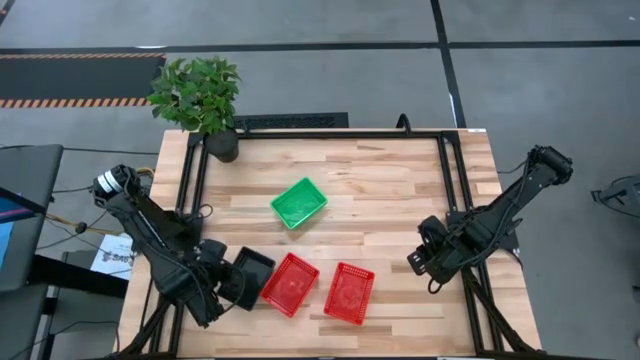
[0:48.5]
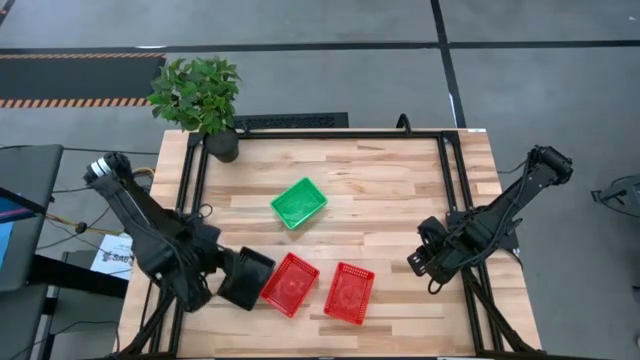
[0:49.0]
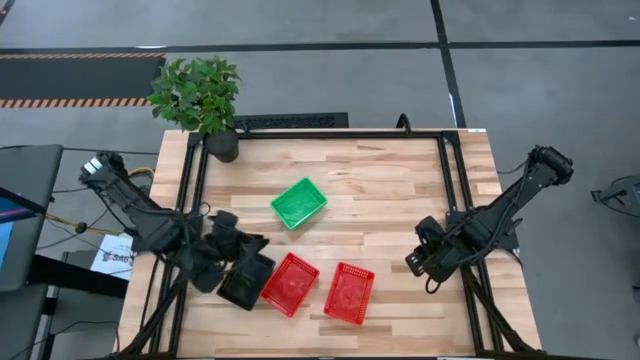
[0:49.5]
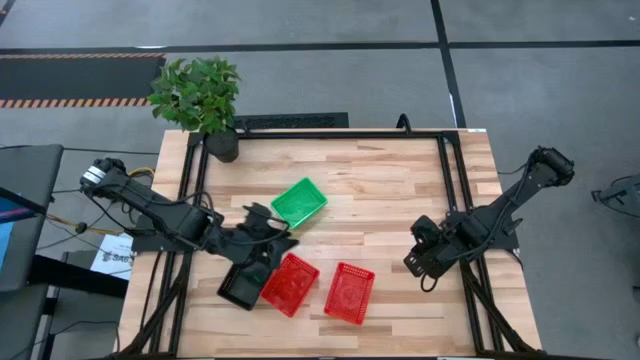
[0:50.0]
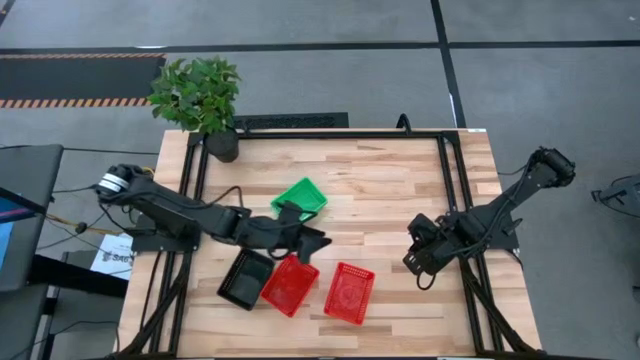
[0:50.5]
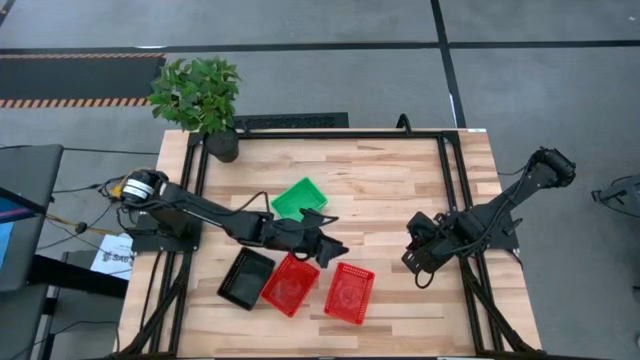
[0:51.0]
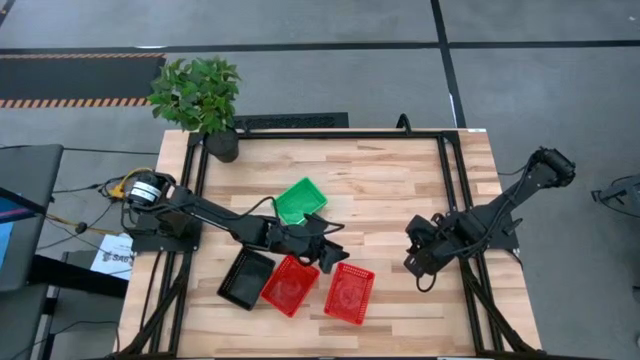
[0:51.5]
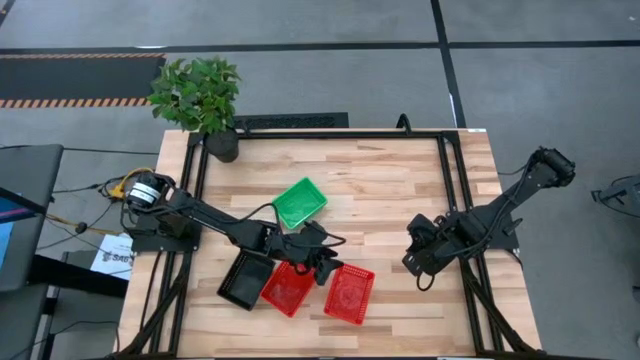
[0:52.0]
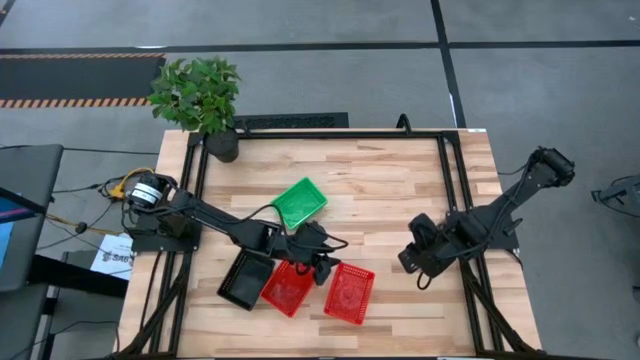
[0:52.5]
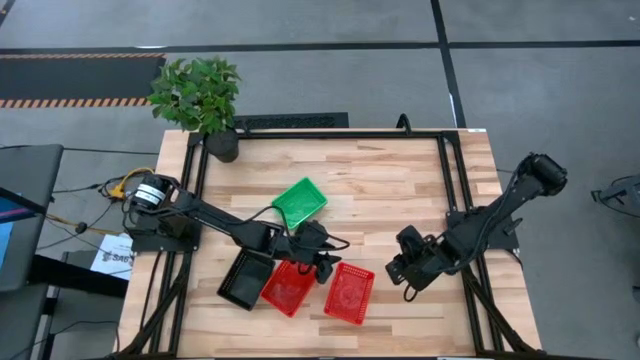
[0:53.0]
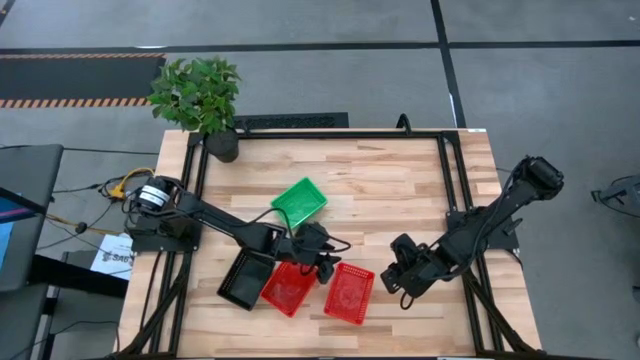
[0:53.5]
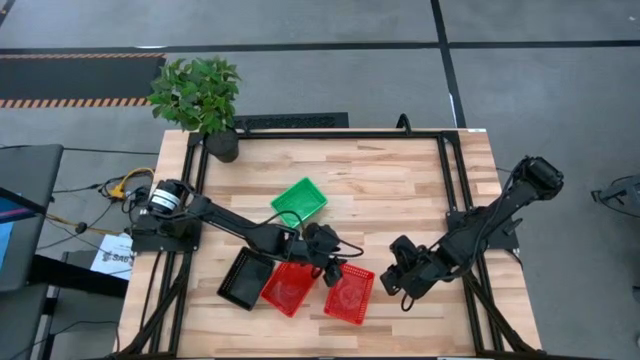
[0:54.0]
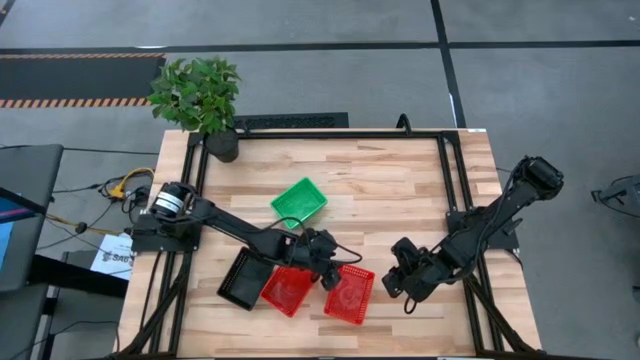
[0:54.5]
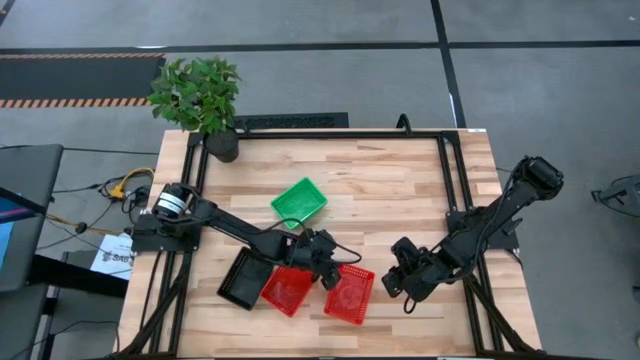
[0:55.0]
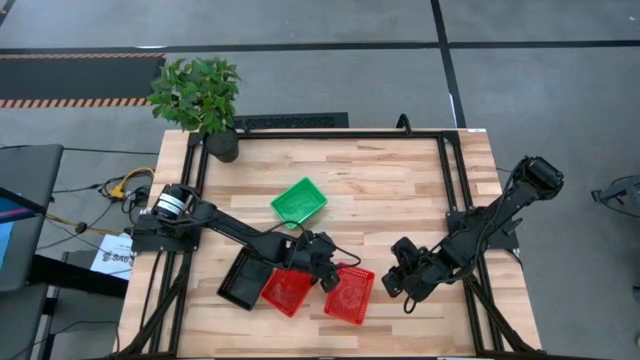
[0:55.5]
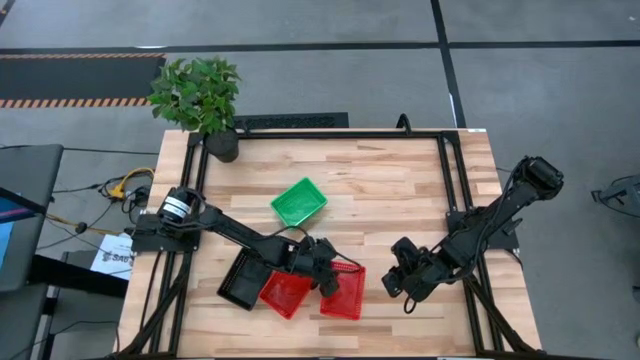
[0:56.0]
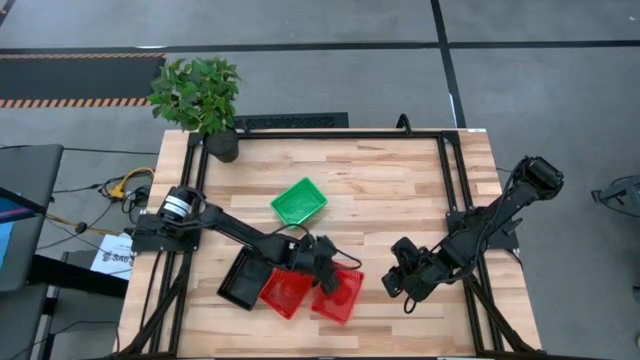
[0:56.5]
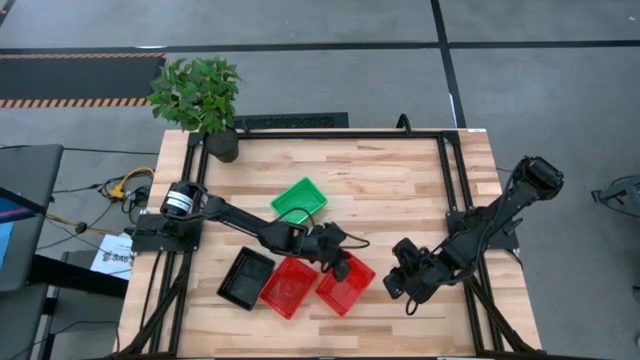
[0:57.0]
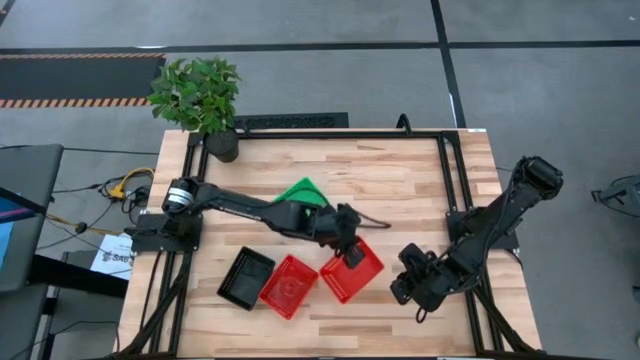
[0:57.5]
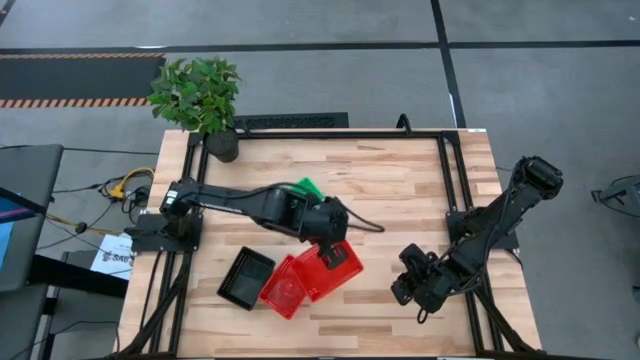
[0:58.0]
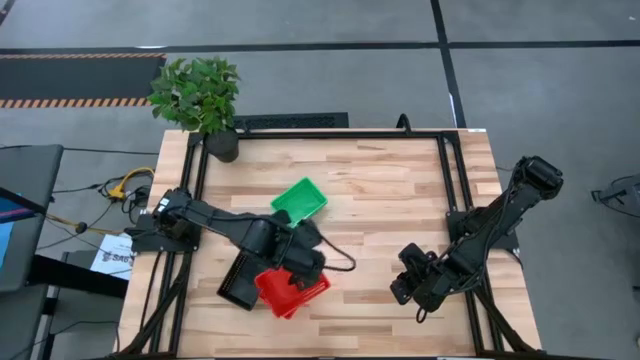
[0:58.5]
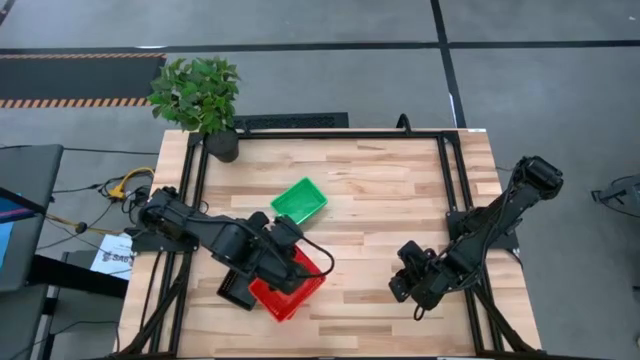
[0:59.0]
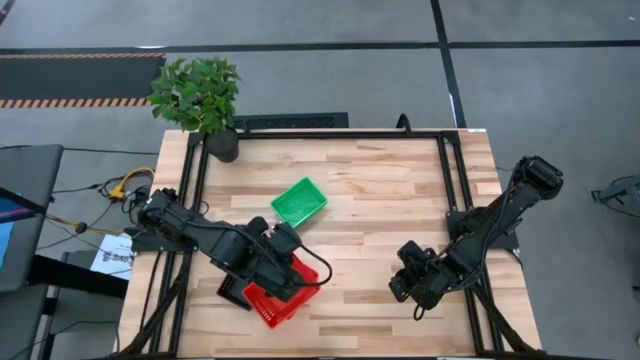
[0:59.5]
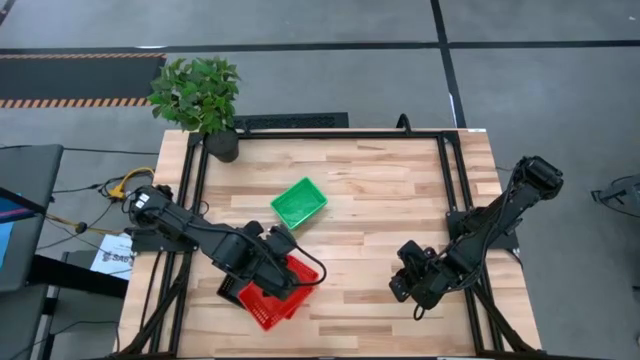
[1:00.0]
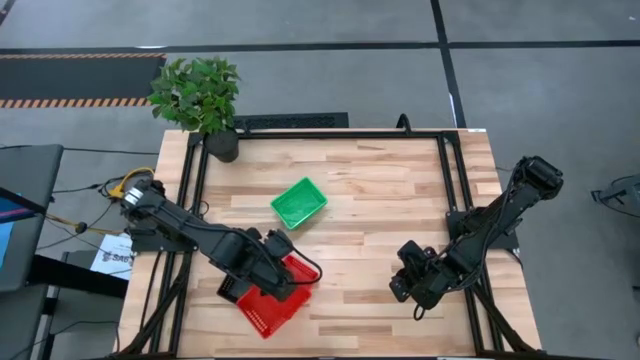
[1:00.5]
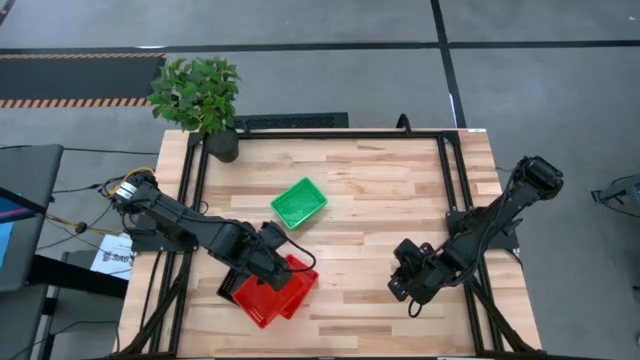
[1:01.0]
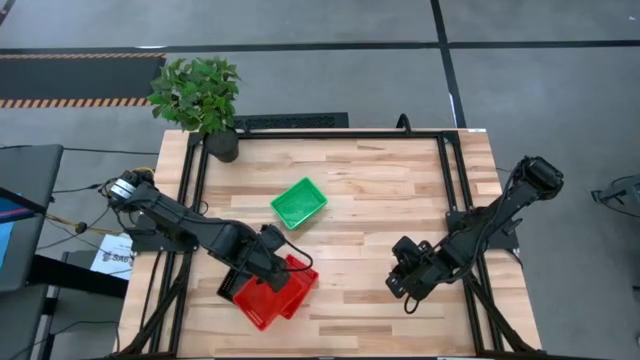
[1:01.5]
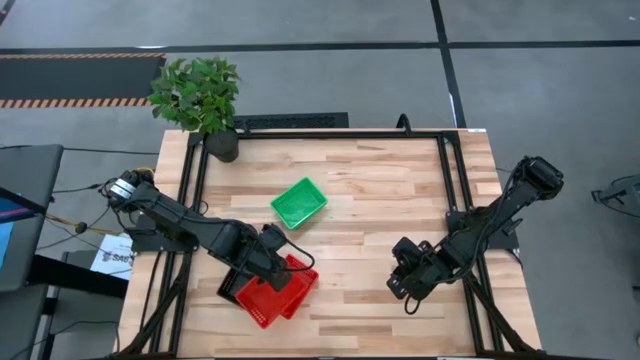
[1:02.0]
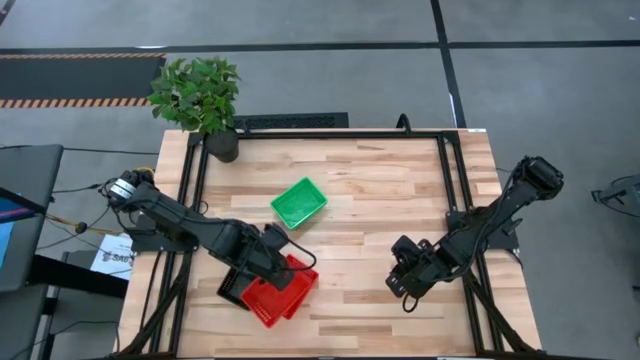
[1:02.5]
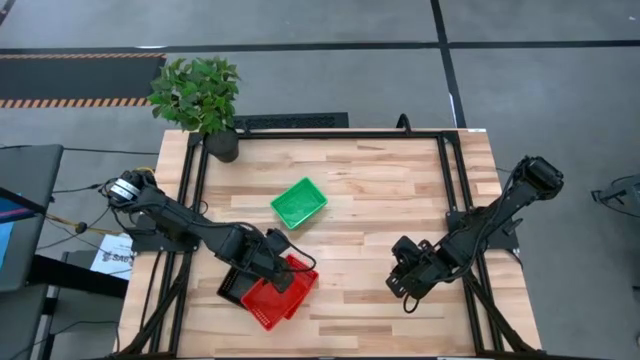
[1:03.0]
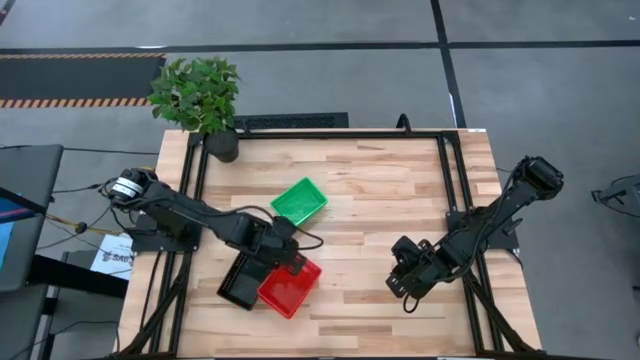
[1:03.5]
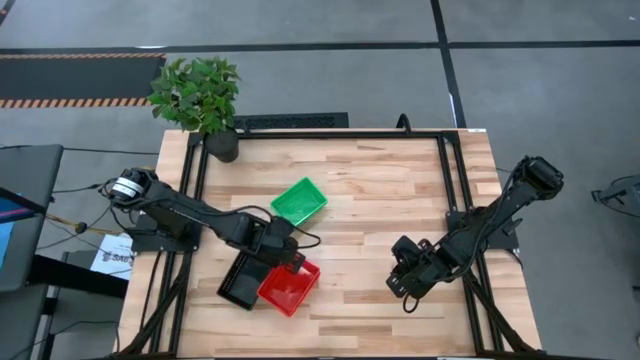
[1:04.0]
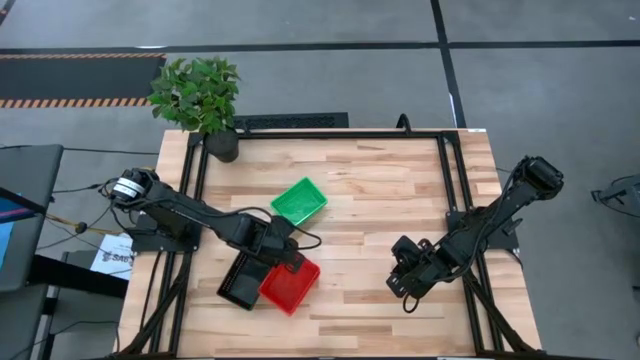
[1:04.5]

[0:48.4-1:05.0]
Stack the right red bin on top of the left red bins
